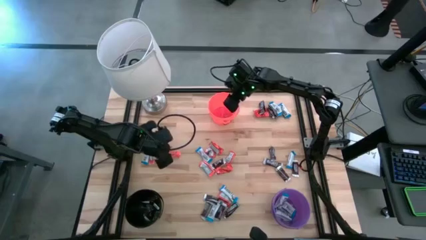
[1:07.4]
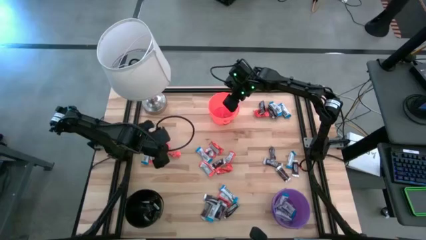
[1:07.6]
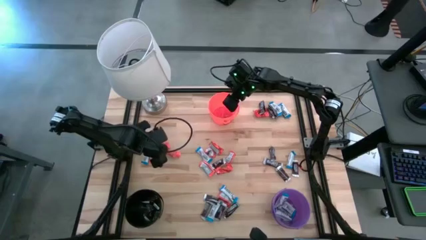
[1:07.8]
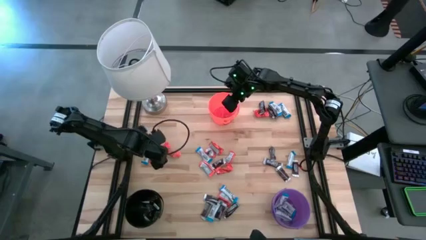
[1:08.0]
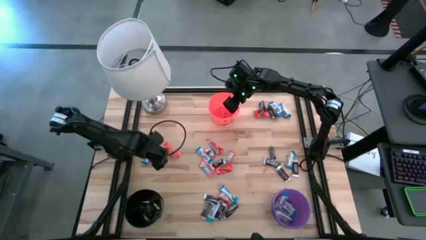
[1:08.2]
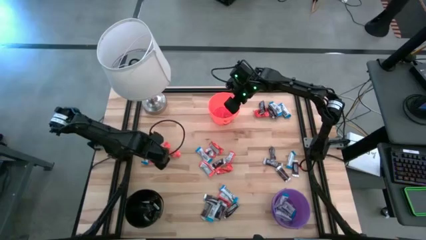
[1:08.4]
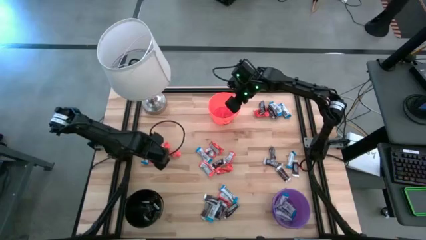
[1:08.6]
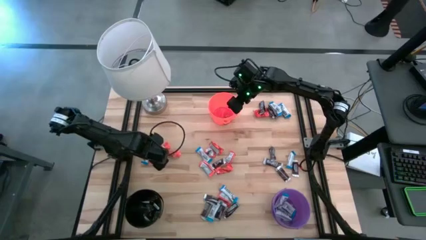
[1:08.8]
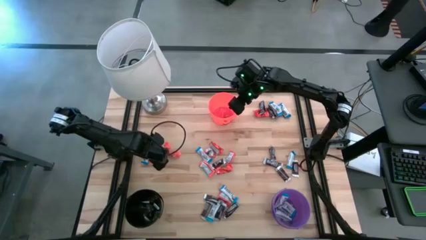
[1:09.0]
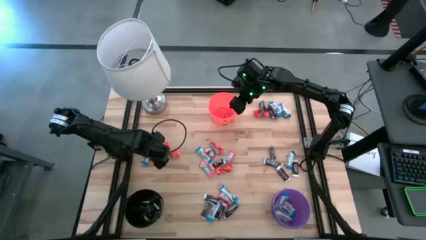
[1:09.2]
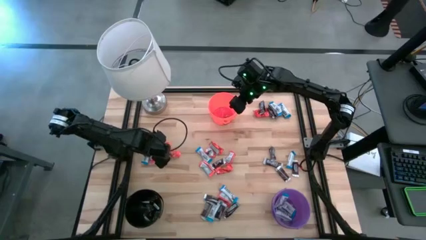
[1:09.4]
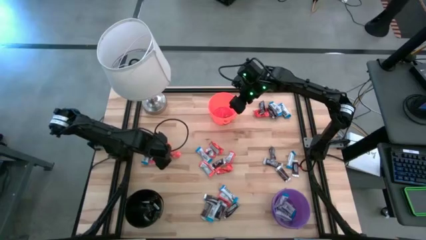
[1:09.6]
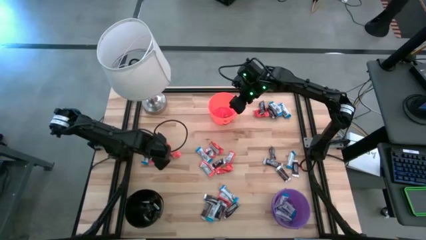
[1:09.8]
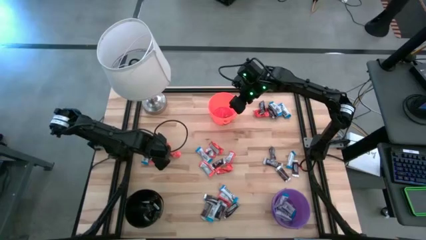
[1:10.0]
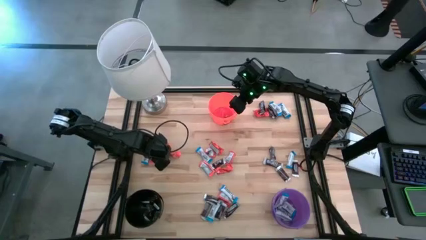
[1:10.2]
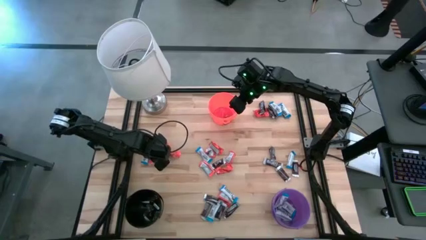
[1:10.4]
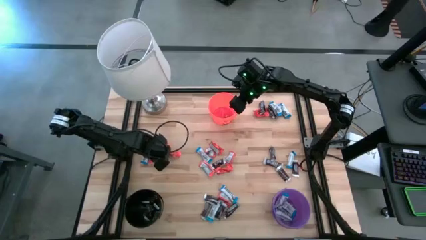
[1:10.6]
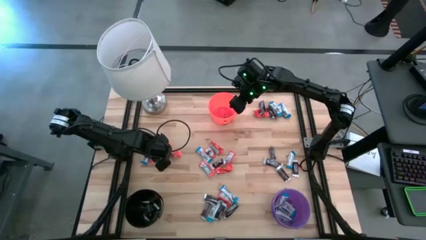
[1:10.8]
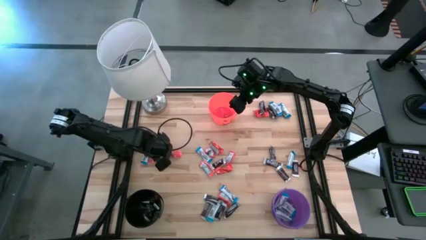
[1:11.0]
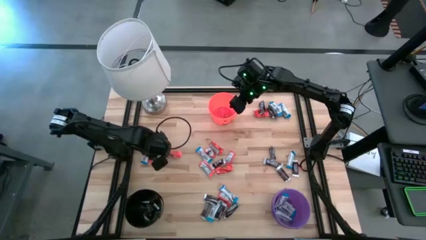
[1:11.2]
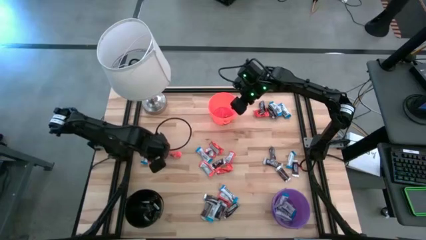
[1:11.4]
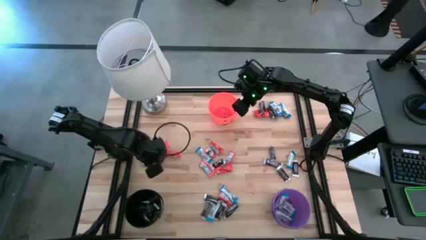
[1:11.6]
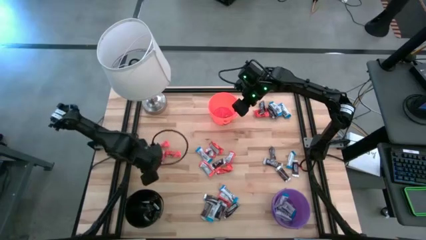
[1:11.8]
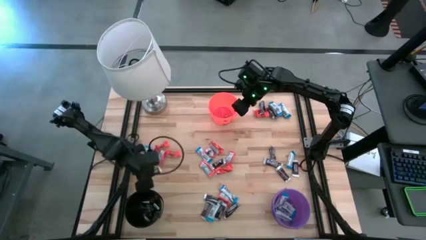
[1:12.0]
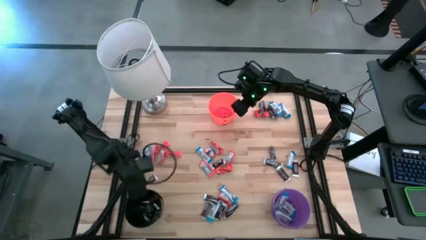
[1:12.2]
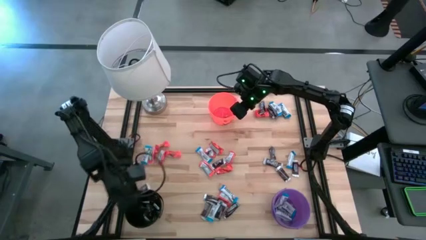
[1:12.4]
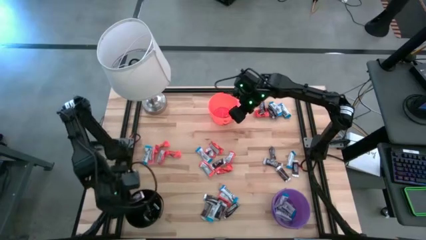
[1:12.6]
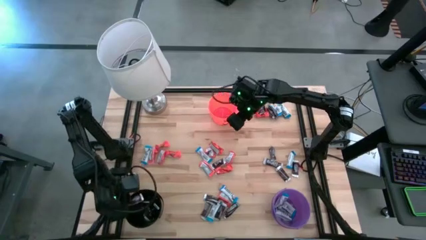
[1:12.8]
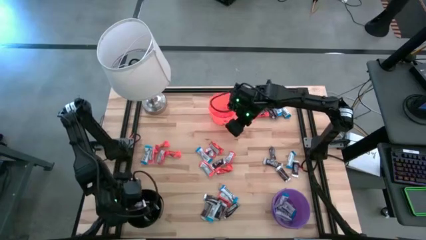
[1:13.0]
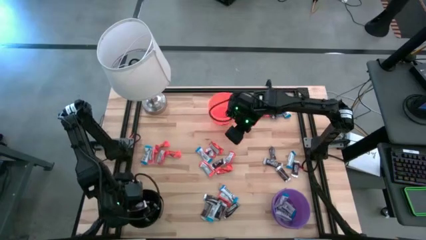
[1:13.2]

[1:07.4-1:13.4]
Task: Organize candy in baskets
Put the brown chocolate into the black bucket

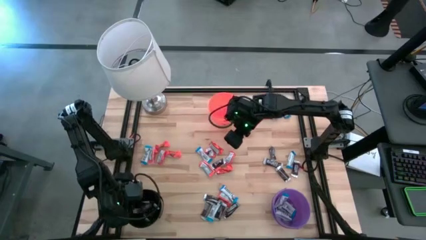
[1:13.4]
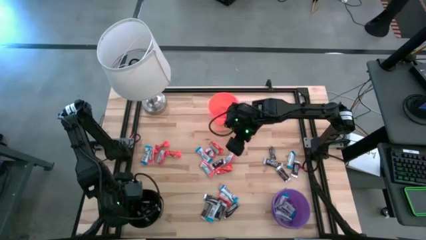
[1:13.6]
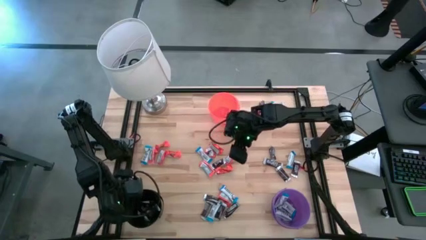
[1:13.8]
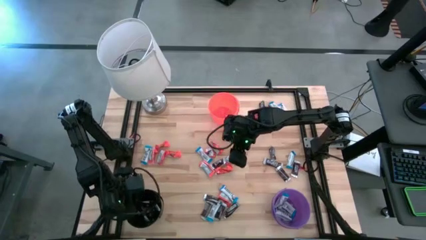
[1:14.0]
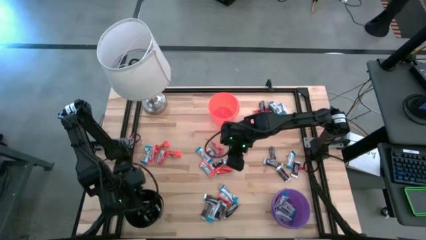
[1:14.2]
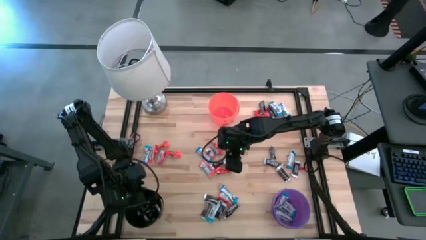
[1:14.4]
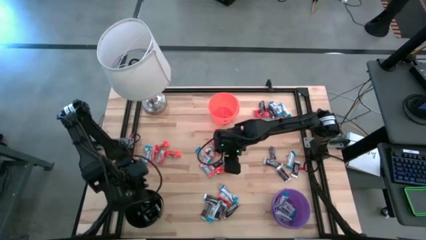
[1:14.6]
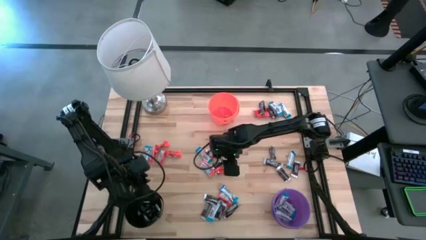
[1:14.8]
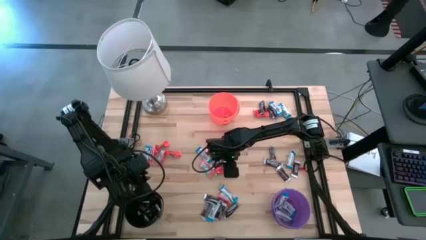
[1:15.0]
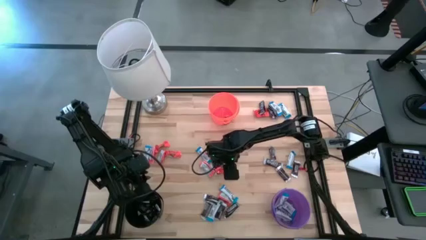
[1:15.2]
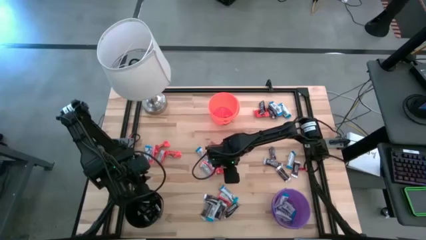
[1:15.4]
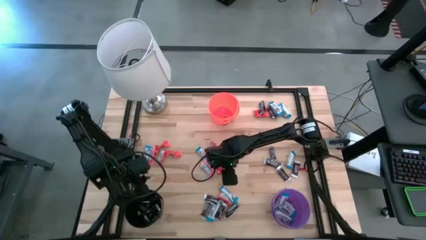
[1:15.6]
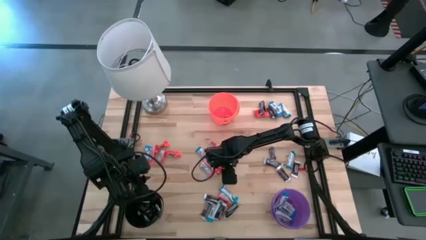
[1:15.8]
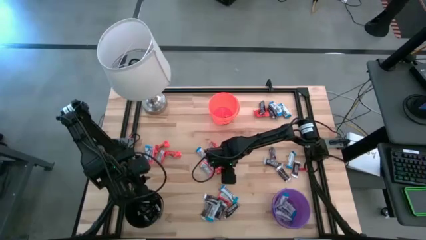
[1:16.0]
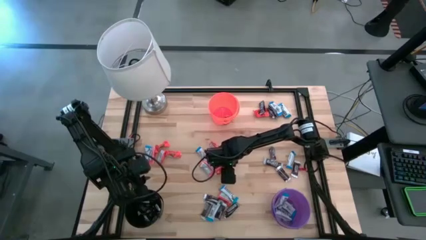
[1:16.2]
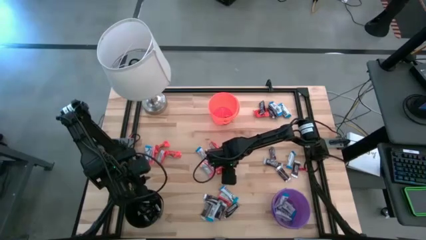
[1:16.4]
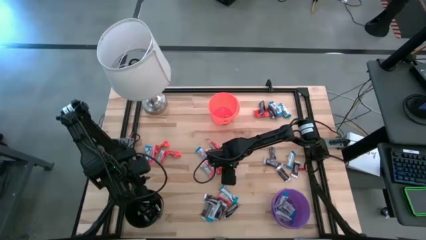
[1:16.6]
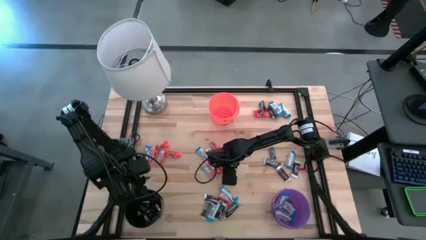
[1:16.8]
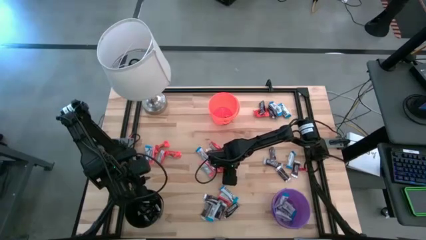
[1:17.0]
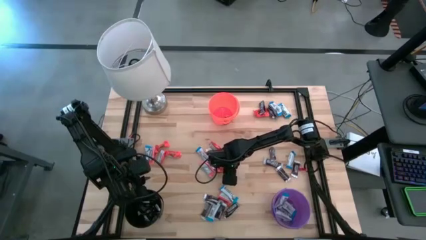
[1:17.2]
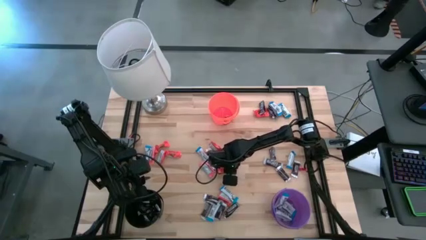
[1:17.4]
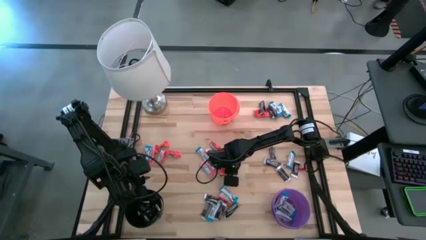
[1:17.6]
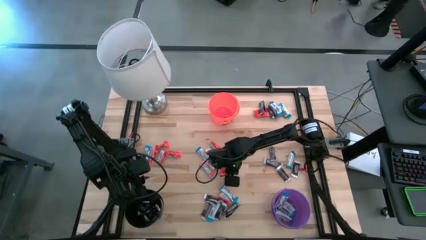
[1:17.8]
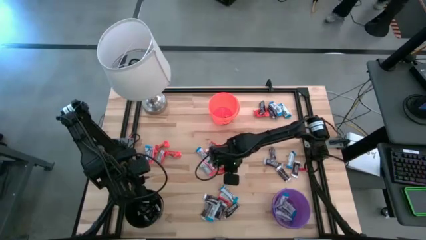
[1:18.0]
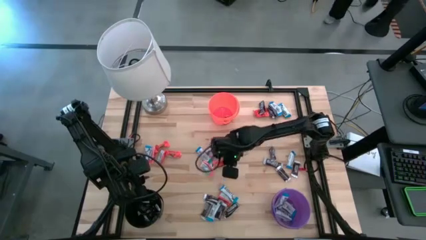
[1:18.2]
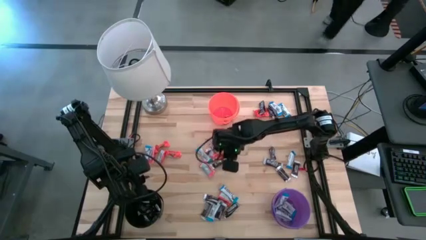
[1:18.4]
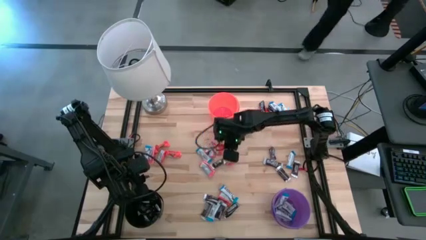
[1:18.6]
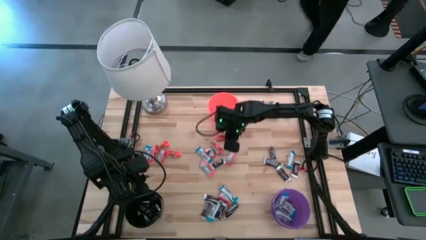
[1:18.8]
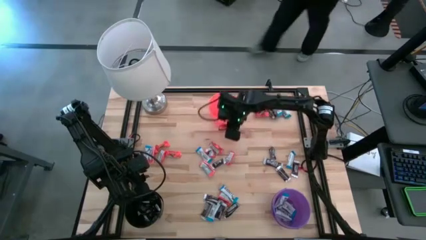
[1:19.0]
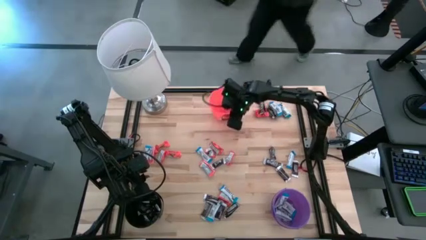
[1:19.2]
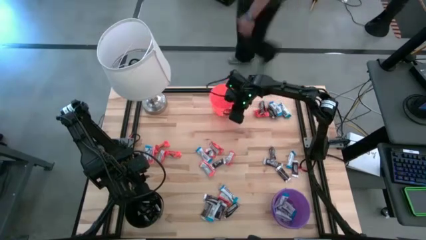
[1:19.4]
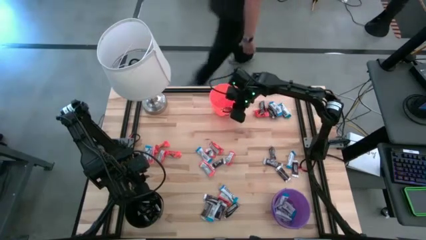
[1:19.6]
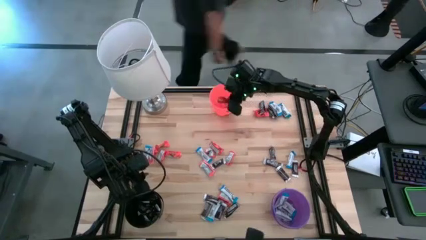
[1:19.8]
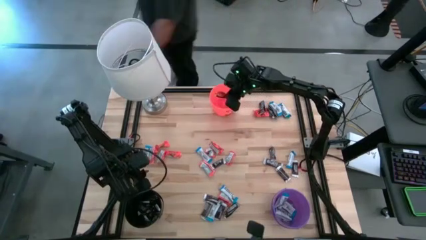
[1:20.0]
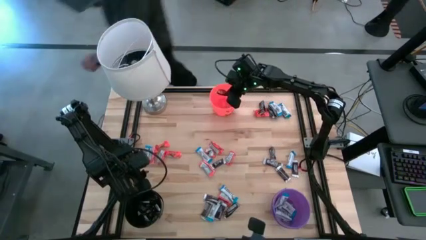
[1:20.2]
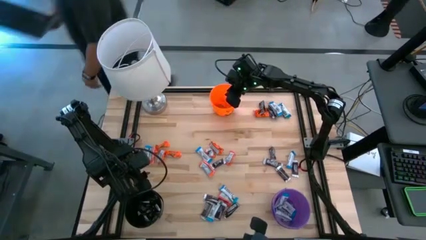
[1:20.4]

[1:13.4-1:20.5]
Put the orange chocolate into the orange bucket

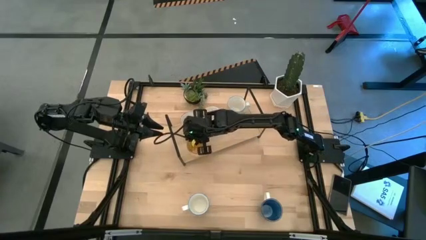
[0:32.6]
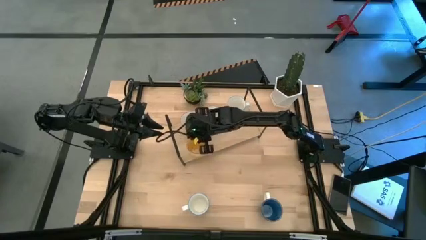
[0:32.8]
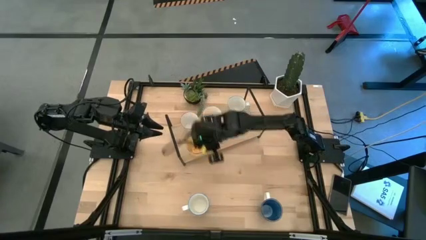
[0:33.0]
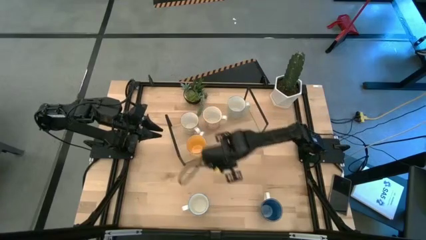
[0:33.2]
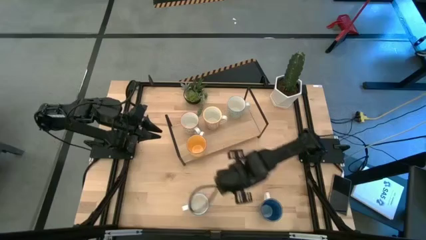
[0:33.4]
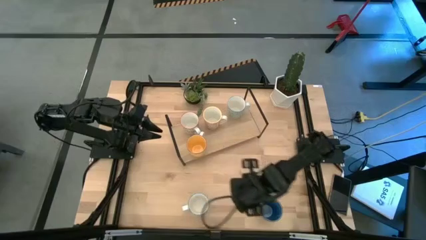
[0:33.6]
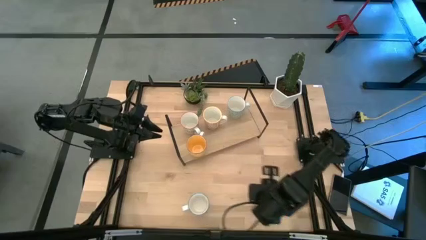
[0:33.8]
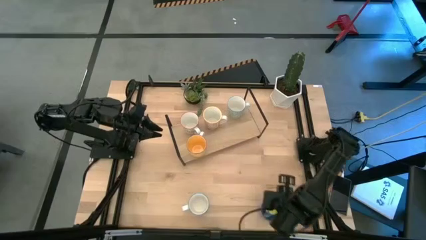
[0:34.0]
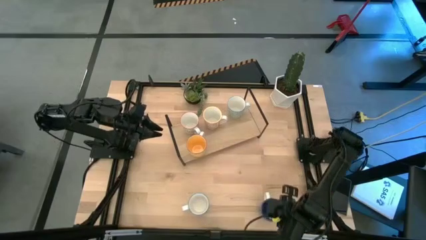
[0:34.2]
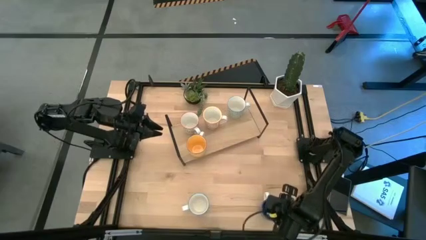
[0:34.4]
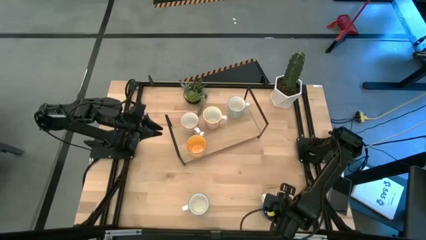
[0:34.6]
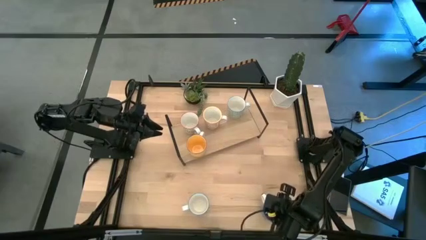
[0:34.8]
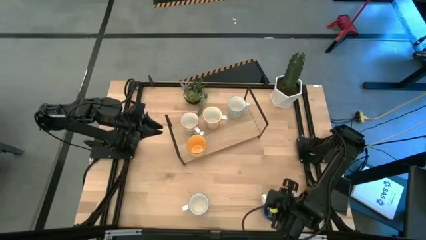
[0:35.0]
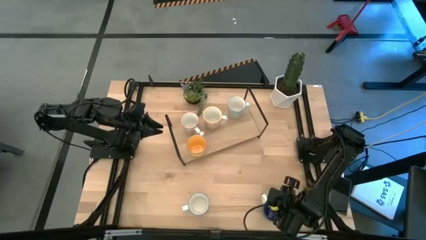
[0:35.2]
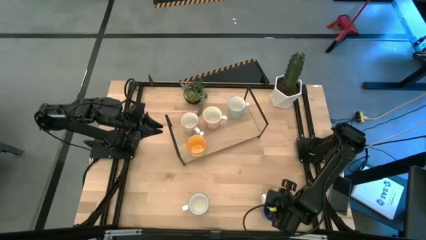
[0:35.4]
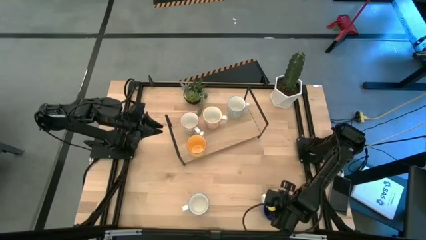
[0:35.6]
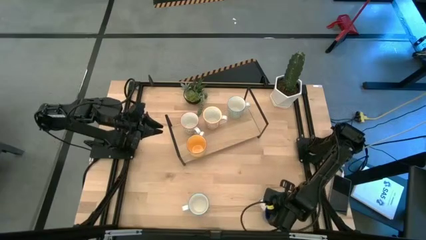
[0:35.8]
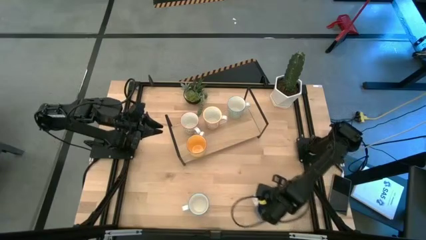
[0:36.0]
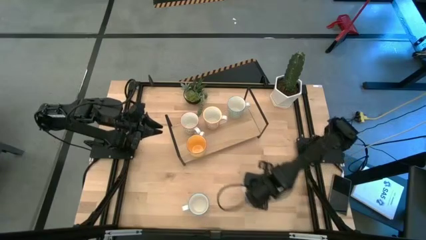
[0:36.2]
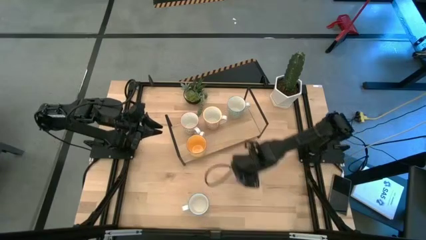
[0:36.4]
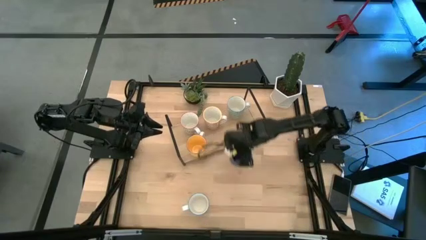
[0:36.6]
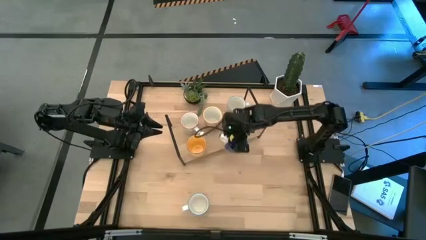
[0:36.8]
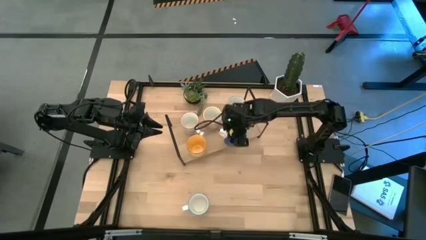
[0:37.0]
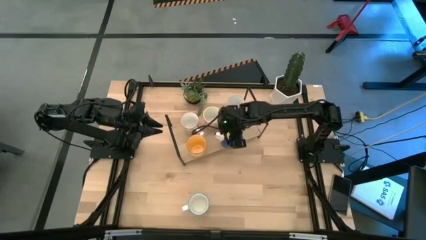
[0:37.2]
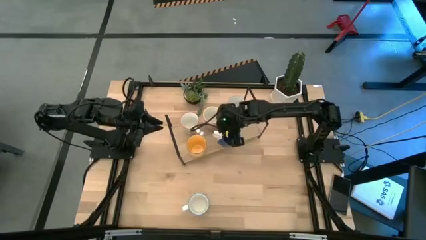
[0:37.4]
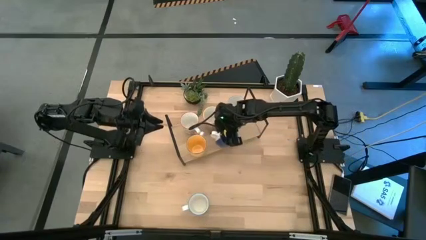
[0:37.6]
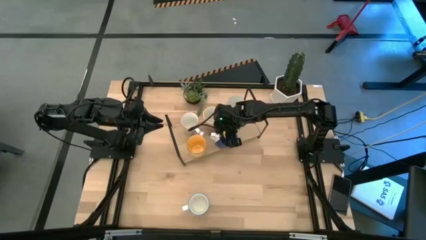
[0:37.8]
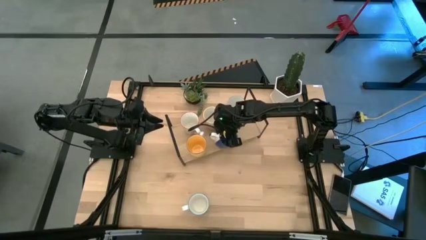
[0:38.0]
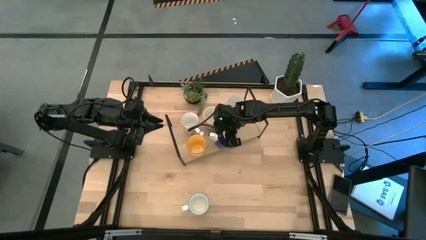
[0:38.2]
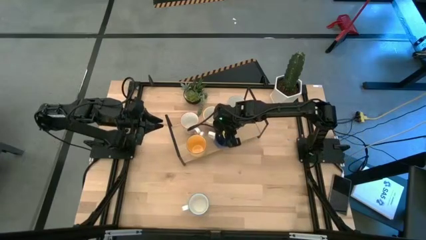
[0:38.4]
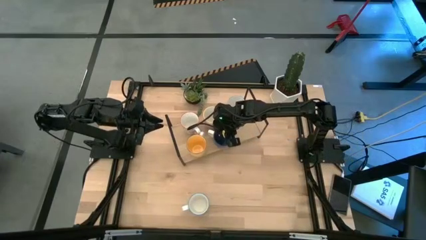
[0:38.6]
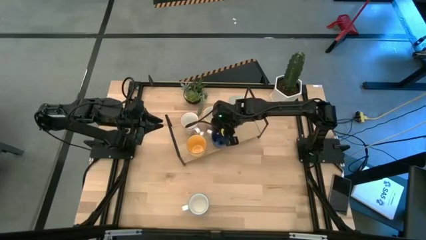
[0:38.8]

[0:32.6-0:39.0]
Task: Place coffee mugs
Put the blue mug on the shelf
